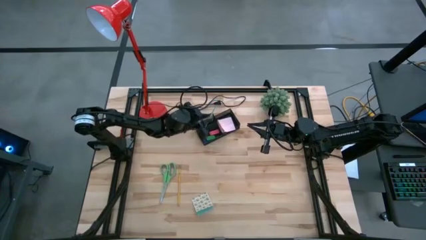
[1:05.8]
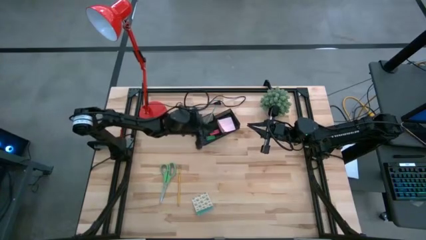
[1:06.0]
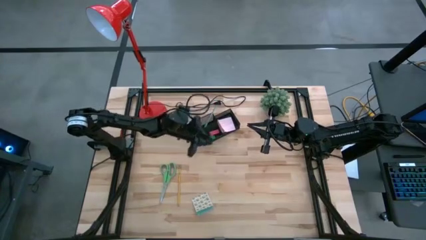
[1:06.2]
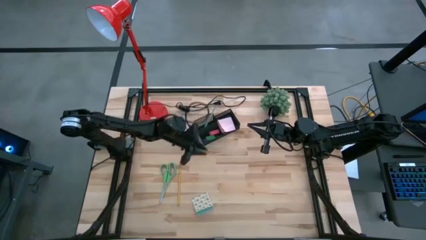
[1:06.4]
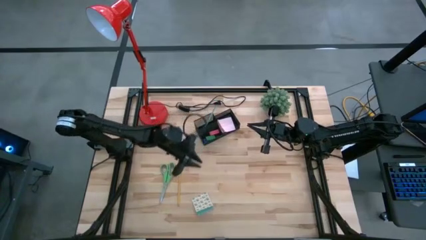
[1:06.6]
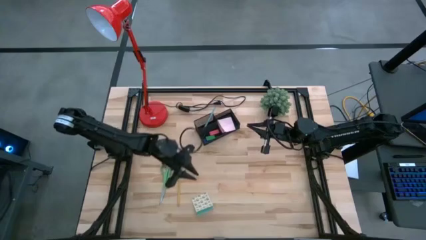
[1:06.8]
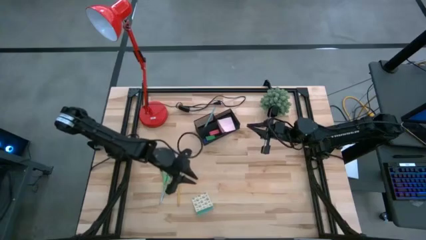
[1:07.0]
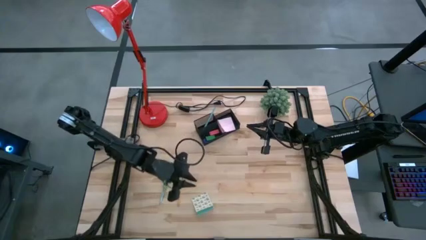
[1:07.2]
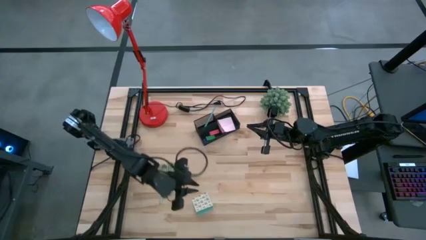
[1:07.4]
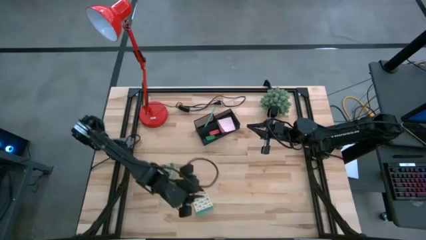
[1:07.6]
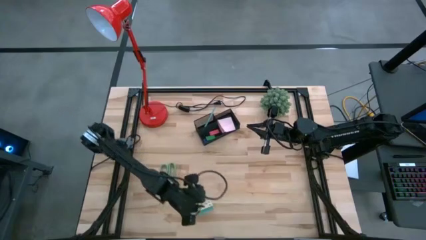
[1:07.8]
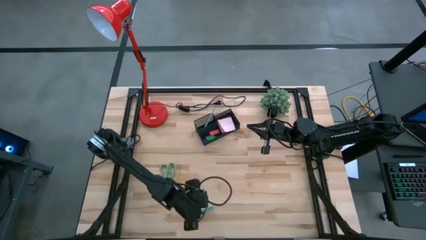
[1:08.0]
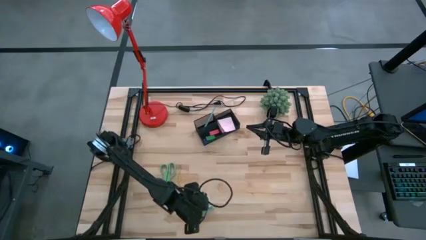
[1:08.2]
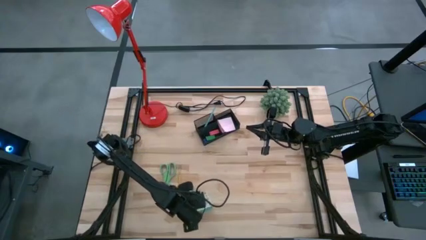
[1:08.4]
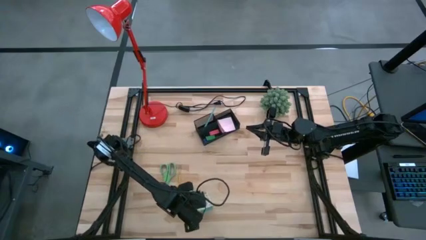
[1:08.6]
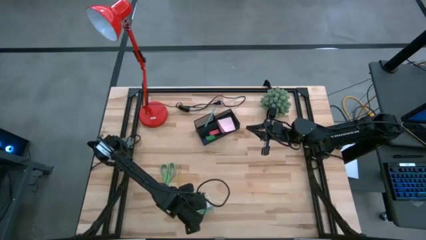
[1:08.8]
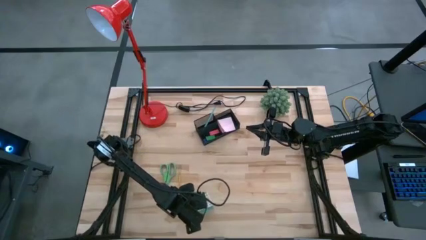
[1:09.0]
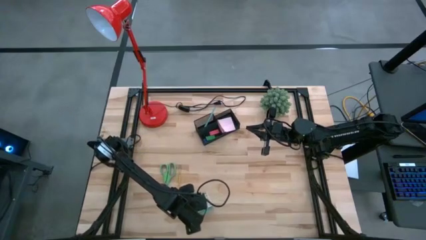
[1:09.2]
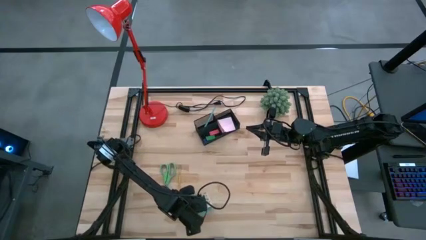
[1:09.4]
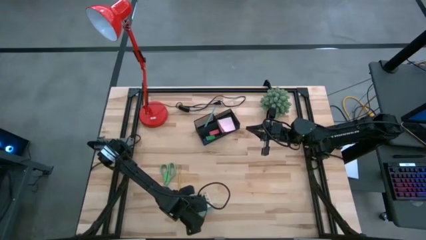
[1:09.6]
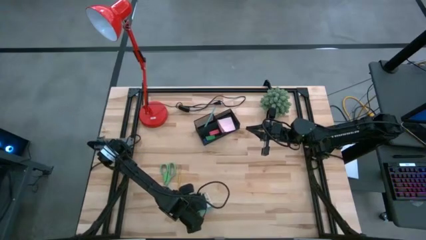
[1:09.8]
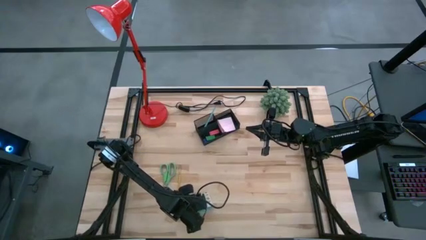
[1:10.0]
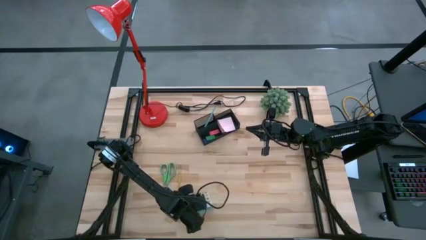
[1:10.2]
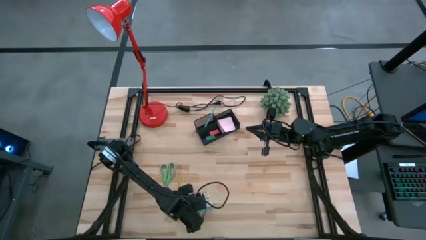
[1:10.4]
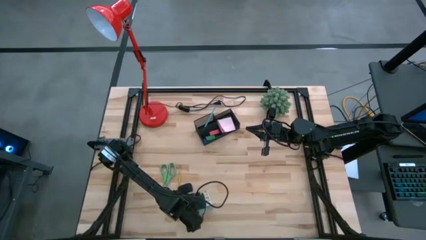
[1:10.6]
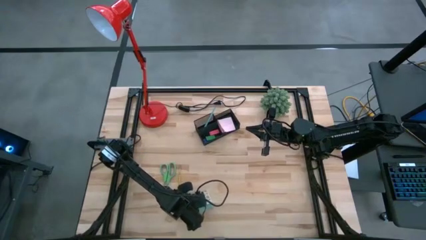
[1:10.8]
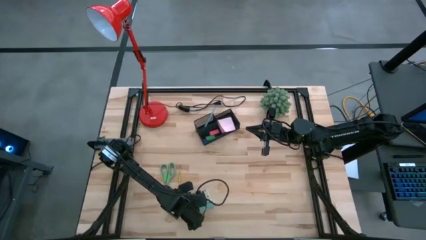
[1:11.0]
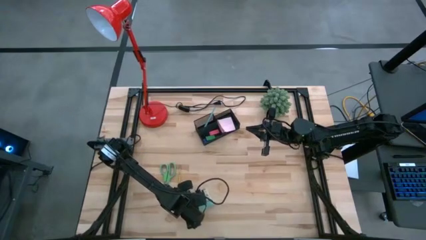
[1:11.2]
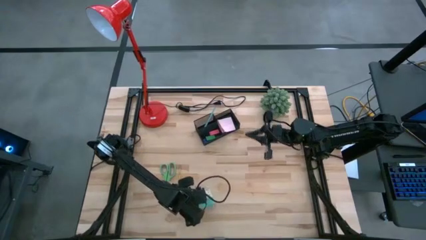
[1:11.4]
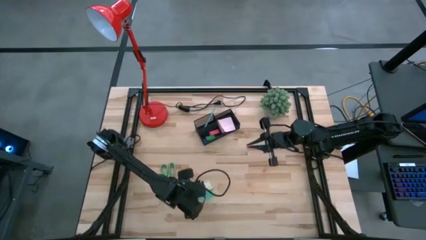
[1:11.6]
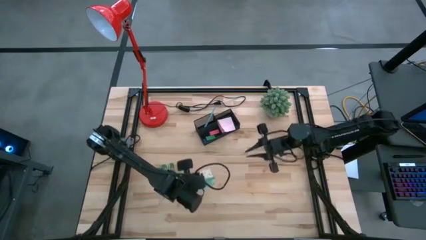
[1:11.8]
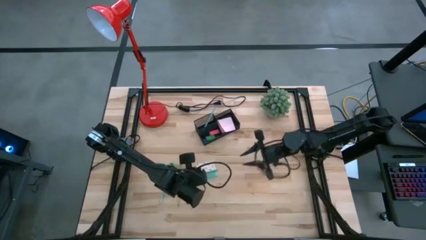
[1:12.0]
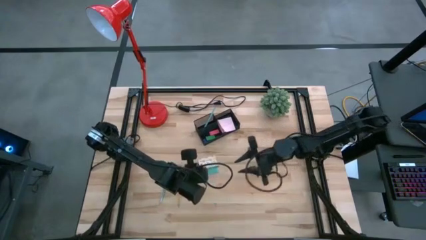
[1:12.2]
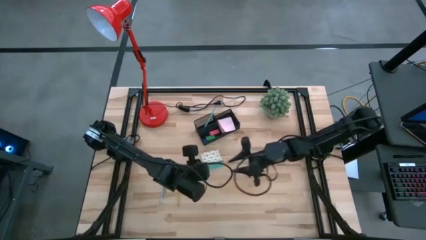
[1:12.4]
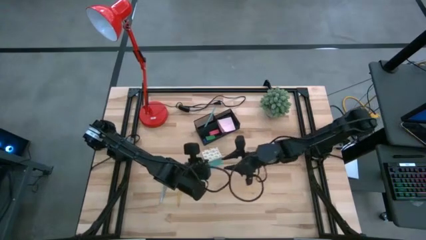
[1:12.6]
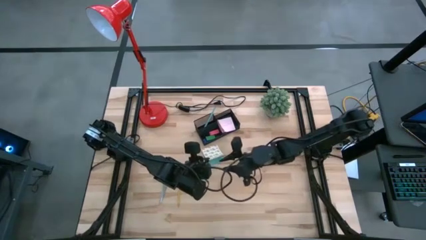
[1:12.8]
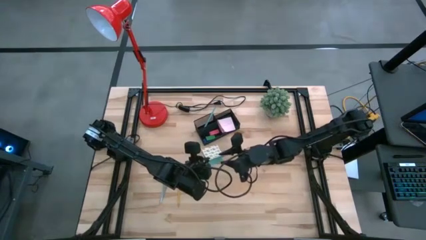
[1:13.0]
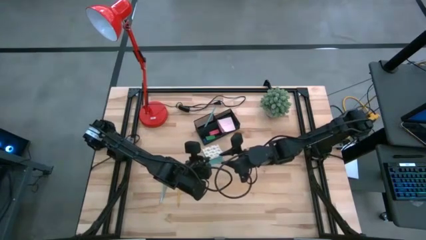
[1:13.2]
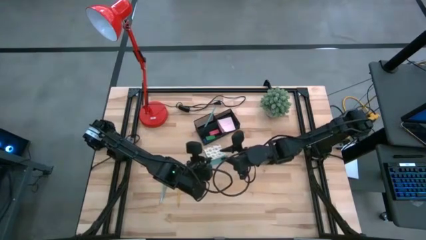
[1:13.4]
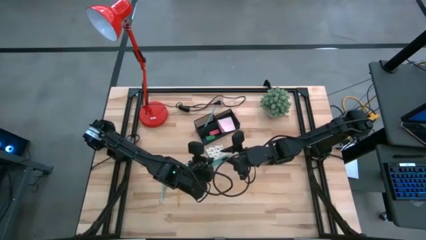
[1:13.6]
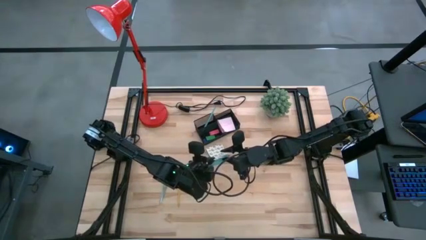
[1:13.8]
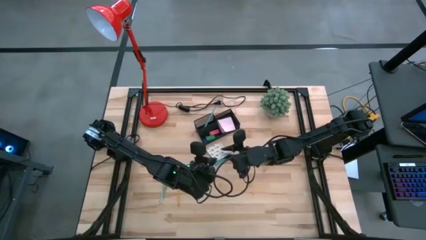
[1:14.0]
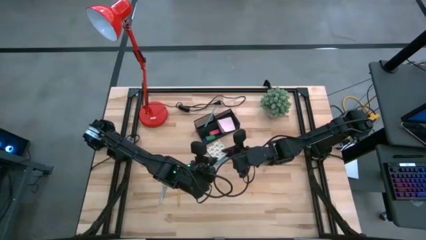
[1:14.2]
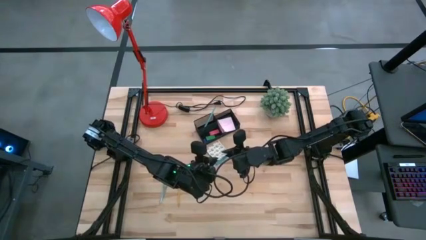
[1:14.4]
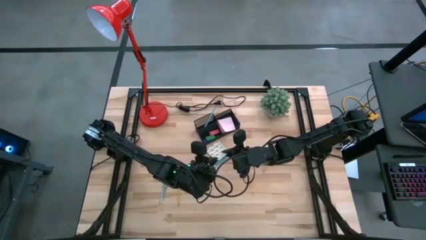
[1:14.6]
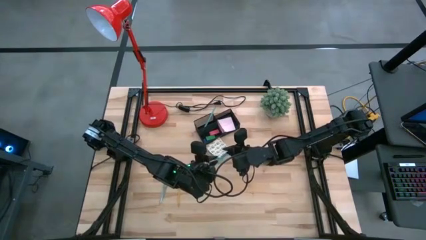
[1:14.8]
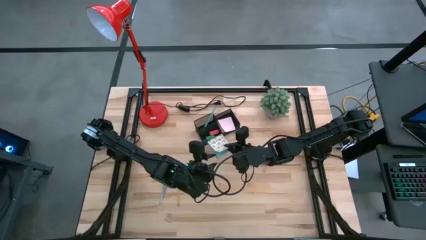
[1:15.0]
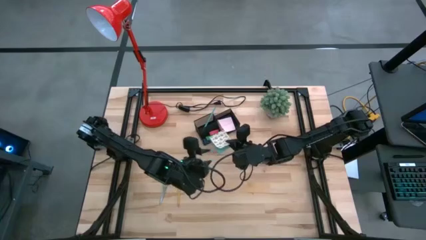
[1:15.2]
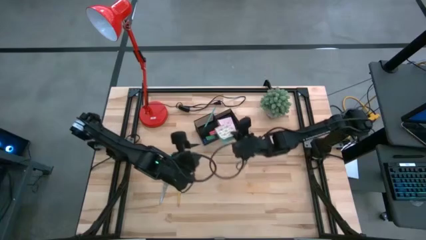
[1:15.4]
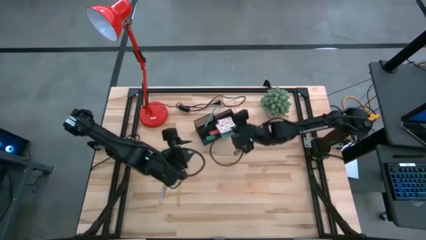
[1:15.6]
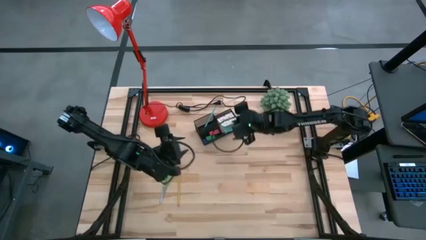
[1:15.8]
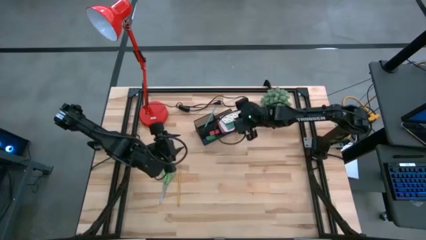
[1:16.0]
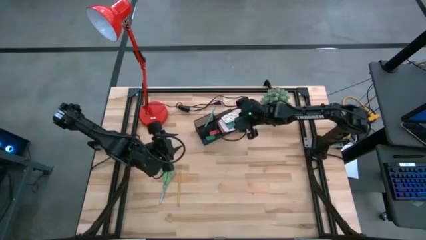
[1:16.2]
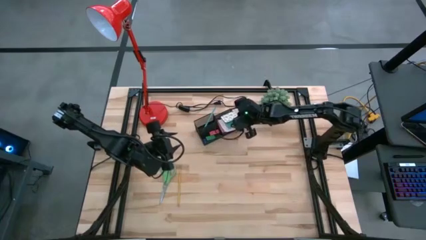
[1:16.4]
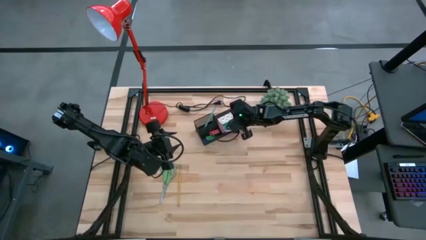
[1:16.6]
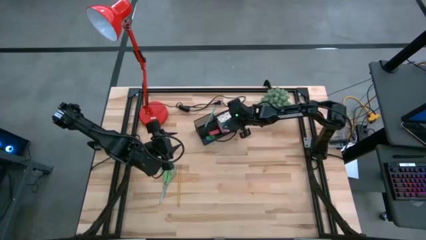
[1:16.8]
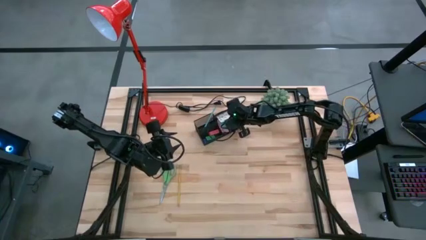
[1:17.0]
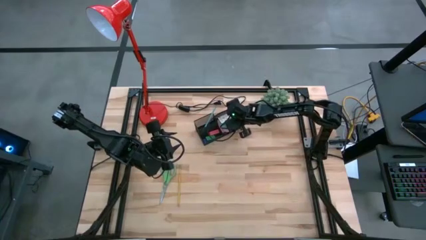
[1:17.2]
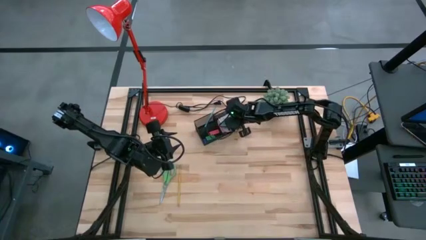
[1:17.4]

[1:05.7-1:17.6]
Task: Pick and place office supplies into organizer
Put the blue sticky note into the desk organizer

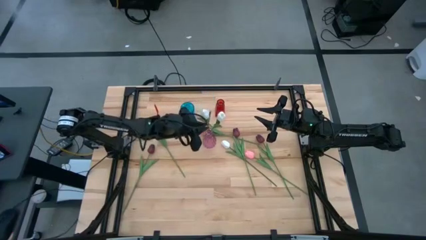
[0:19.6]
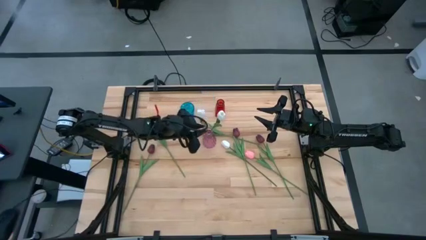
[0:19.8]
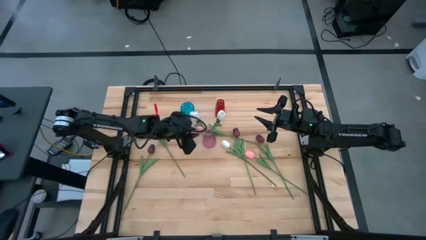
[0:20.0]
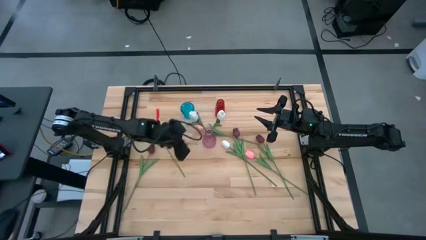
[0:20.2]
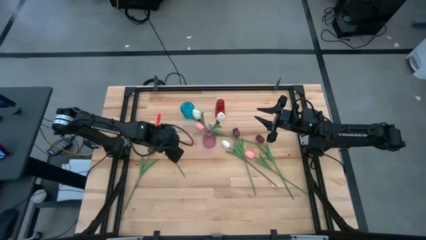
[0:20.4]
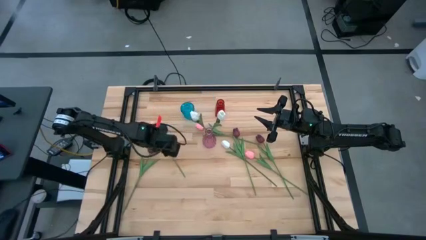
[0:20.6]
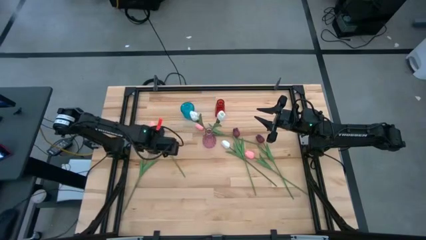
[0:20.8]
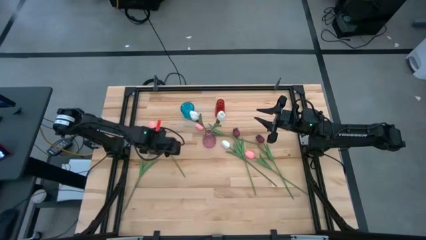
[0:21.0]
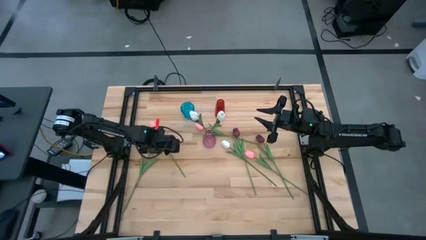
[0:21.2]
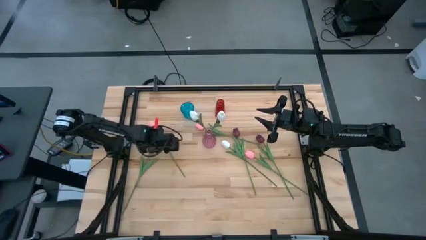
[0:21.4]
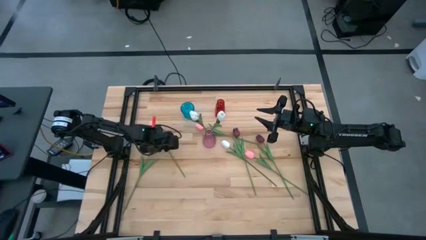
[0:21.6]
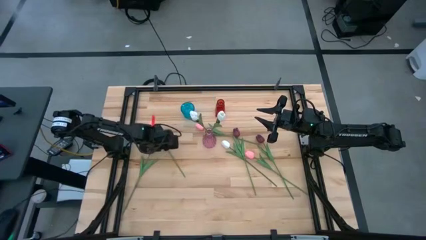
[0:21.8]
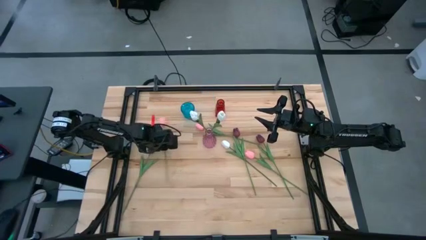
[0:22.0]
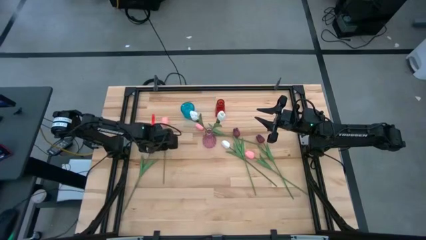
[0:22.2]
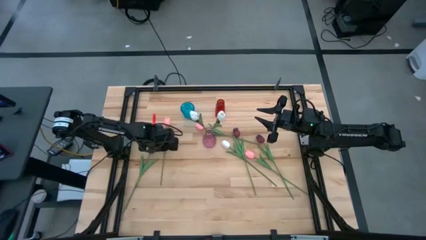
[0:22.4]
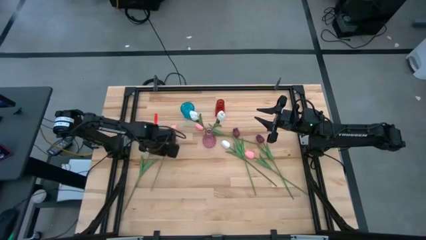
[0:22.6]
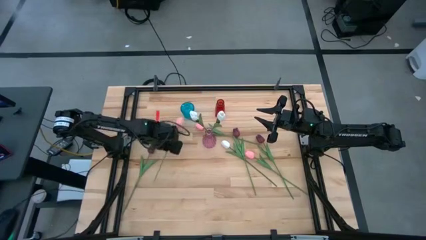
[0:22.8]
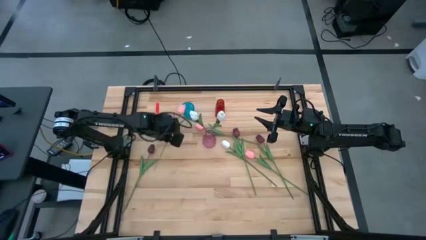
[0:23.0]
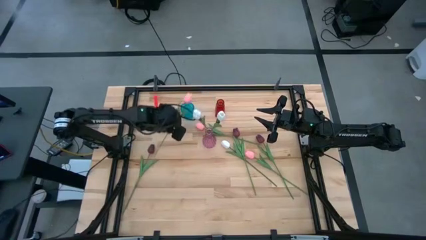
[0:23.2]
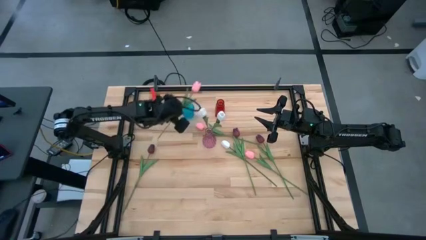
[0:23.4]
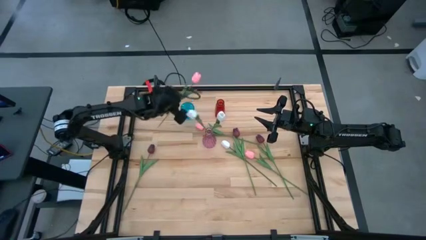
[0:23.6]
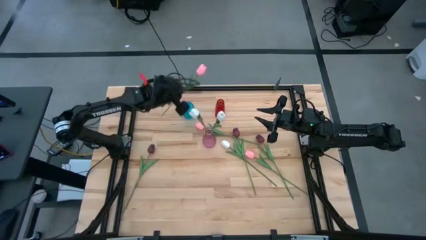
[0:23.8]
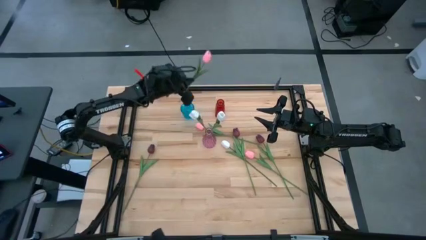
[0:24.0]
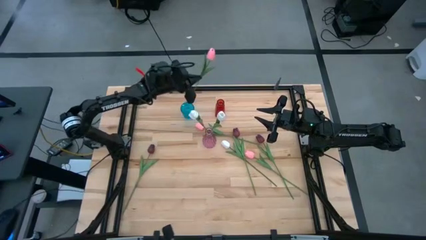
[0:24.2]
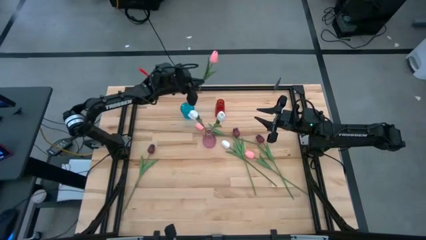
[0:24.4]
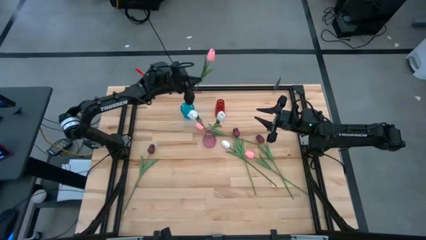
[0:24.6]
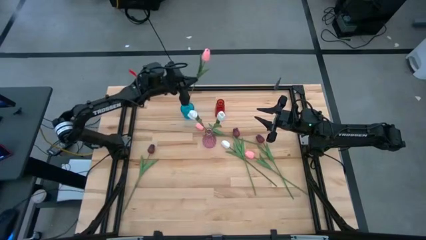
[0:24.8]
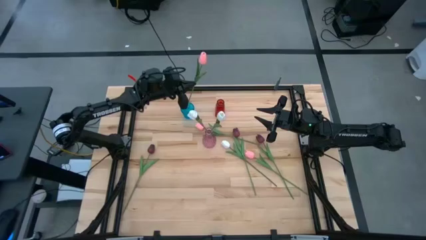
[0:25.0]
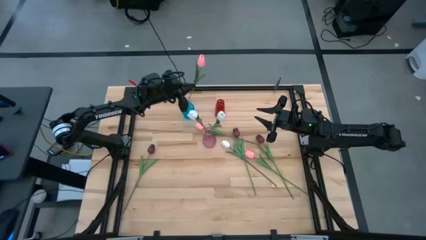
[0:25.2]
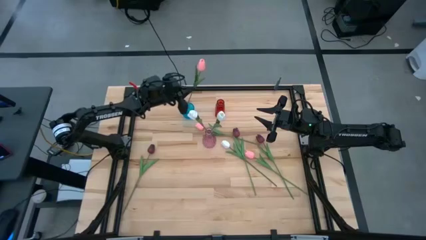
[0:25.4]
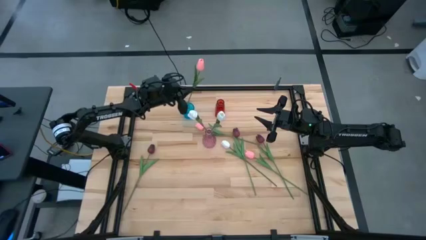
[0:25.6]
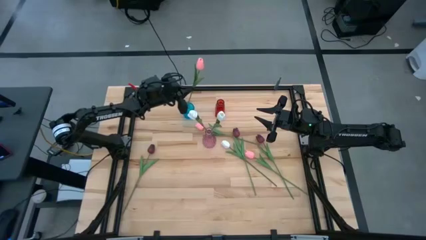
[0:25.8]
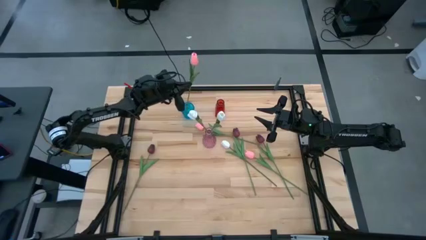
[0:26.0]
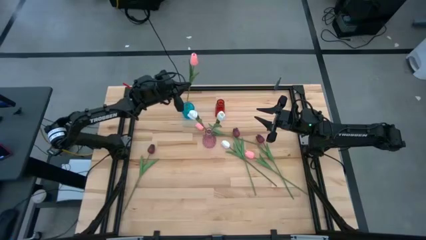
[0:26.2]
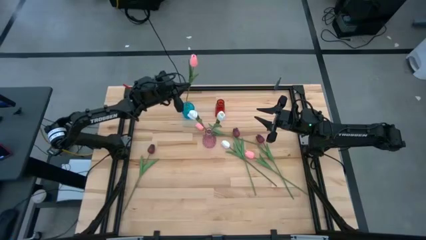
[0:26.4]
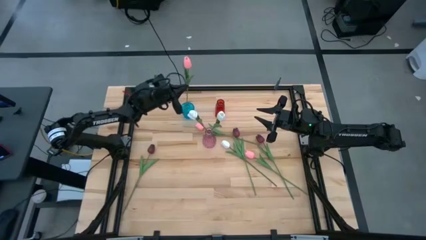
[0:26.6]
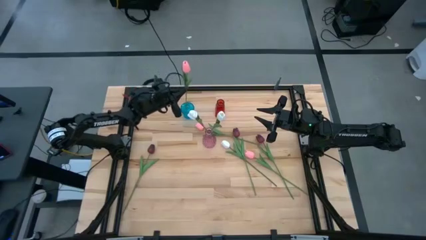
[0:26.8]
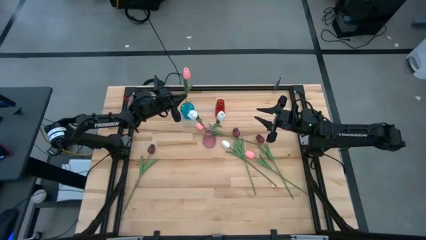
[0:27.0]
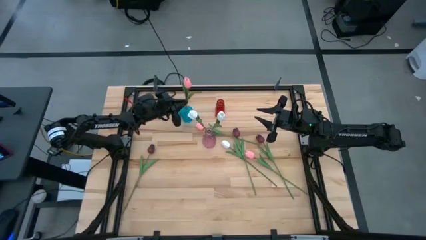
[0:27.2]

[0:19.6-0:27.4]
Task: Sort flowers into vase by color
Put the left pink tulip into the blue vase
